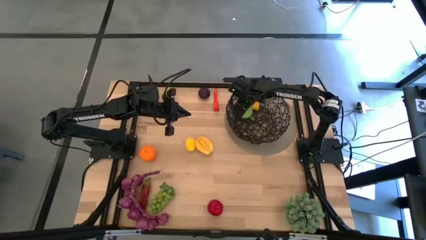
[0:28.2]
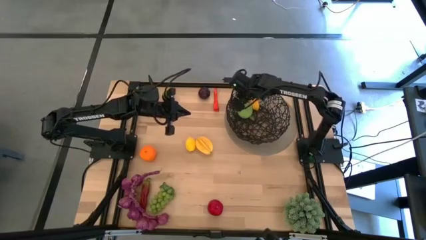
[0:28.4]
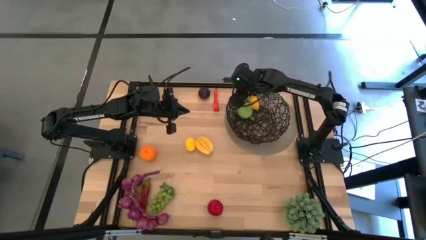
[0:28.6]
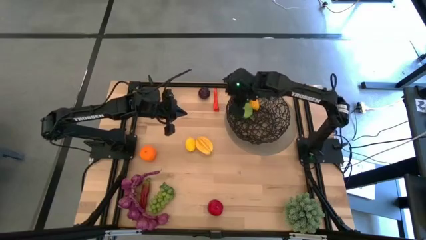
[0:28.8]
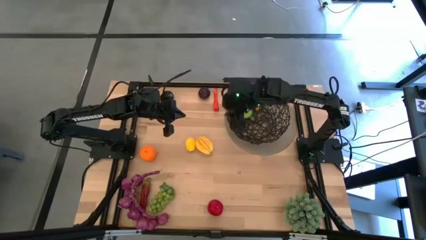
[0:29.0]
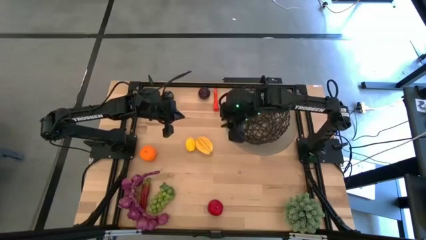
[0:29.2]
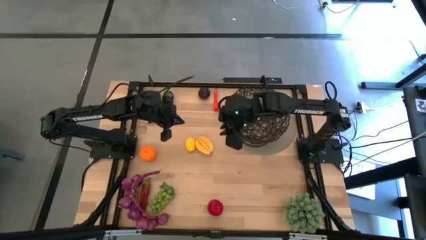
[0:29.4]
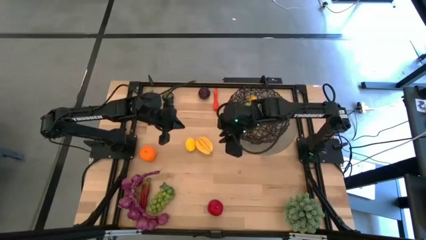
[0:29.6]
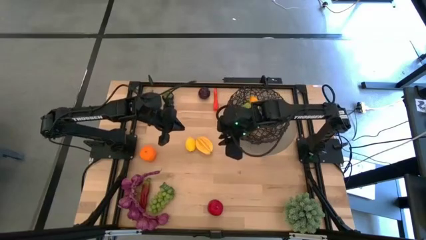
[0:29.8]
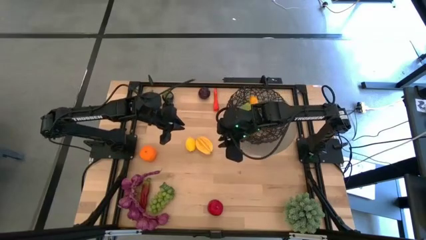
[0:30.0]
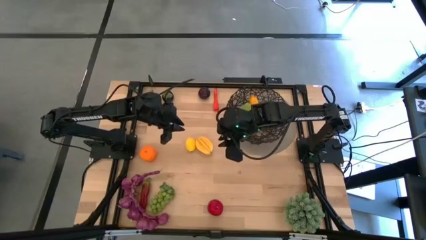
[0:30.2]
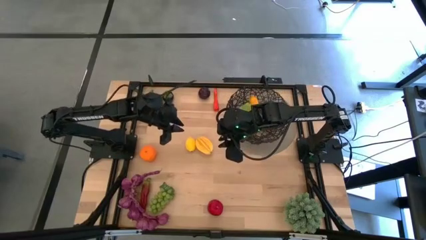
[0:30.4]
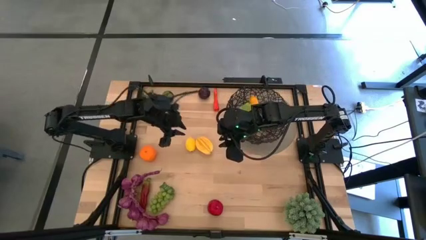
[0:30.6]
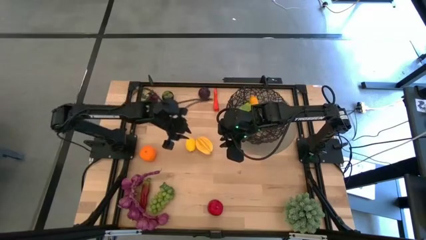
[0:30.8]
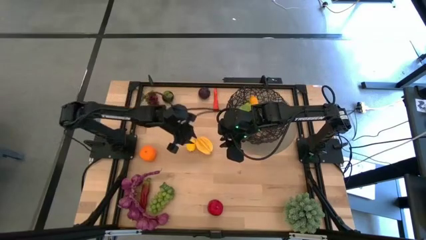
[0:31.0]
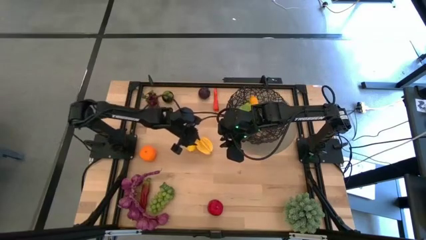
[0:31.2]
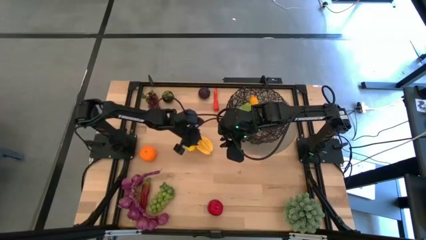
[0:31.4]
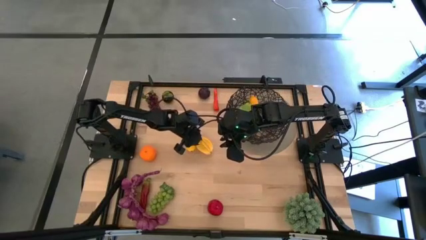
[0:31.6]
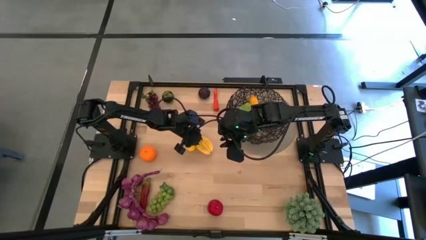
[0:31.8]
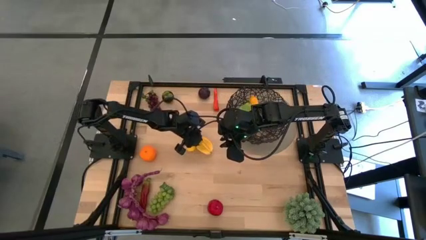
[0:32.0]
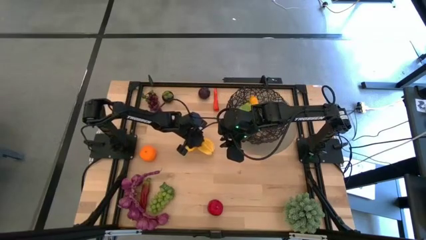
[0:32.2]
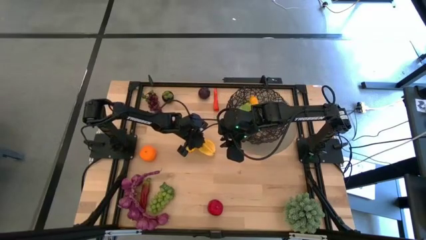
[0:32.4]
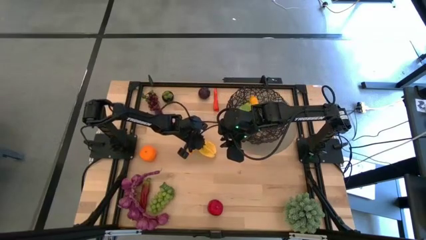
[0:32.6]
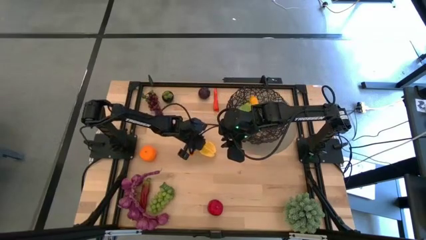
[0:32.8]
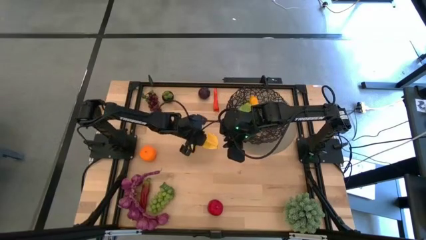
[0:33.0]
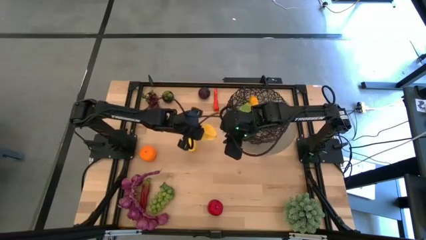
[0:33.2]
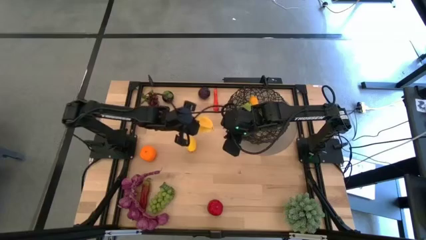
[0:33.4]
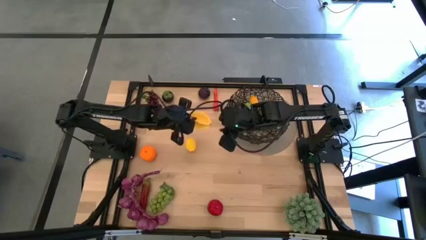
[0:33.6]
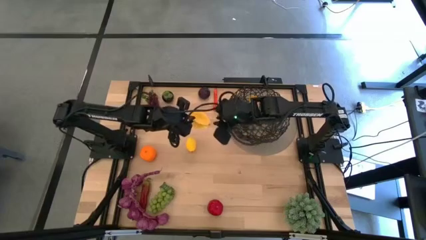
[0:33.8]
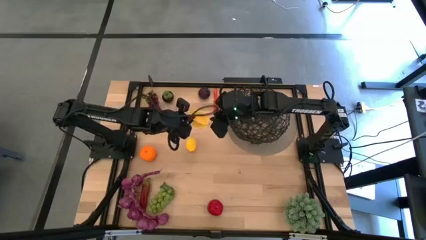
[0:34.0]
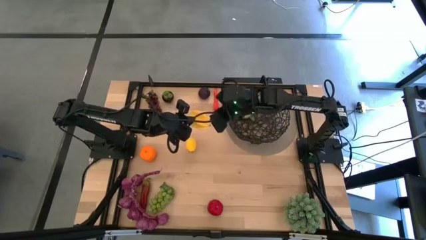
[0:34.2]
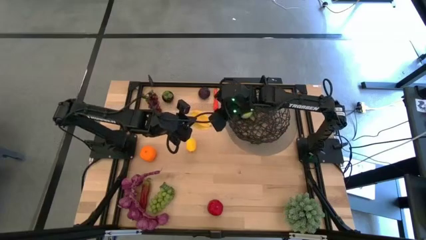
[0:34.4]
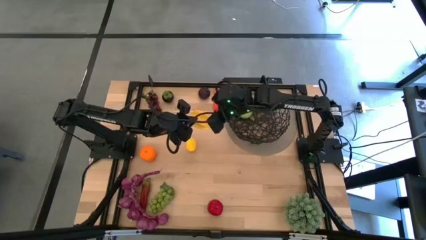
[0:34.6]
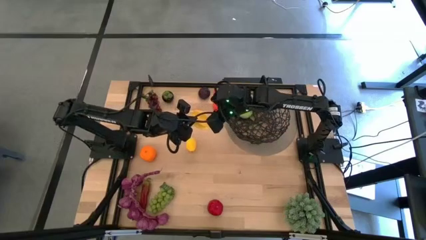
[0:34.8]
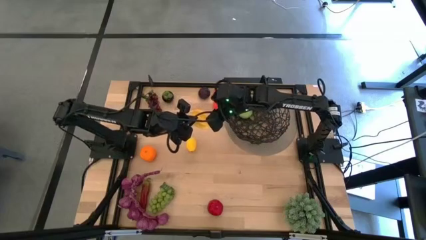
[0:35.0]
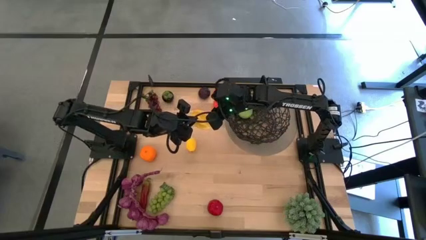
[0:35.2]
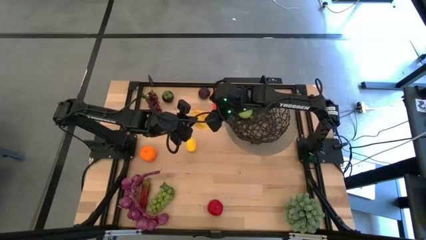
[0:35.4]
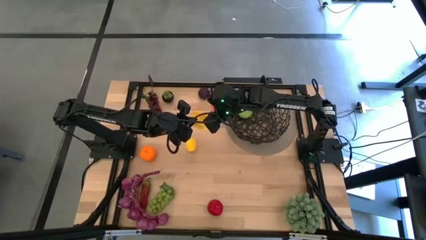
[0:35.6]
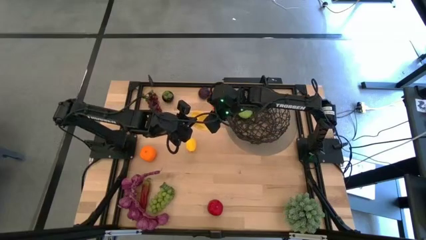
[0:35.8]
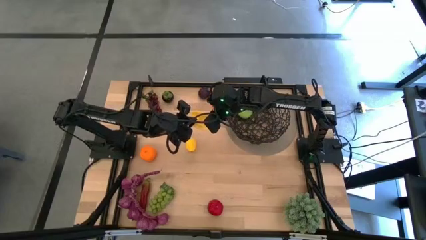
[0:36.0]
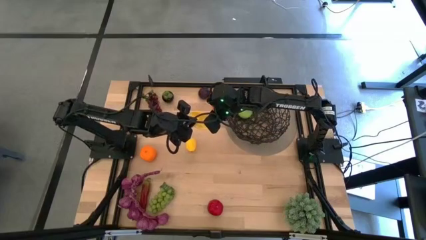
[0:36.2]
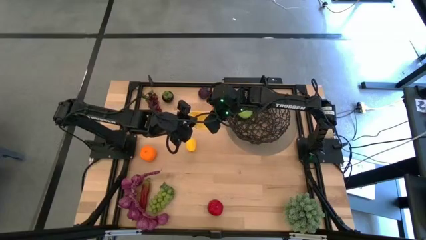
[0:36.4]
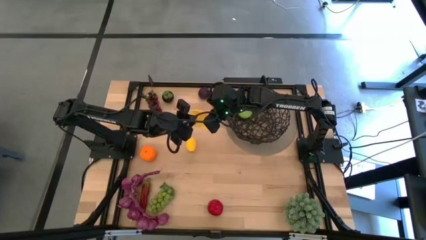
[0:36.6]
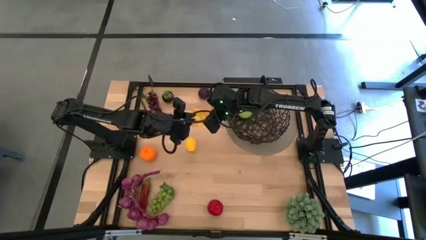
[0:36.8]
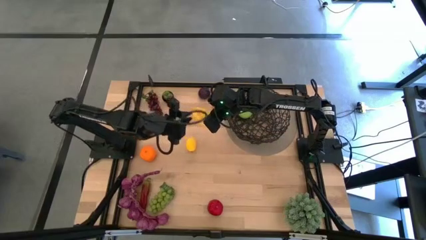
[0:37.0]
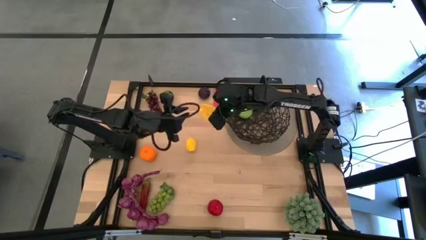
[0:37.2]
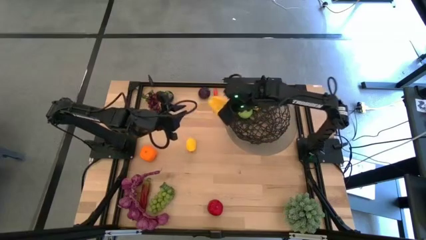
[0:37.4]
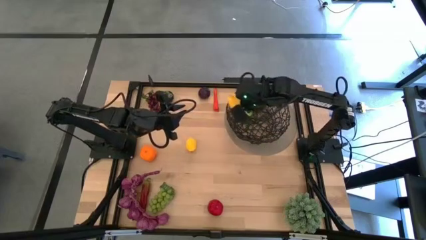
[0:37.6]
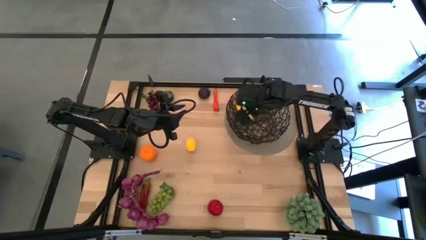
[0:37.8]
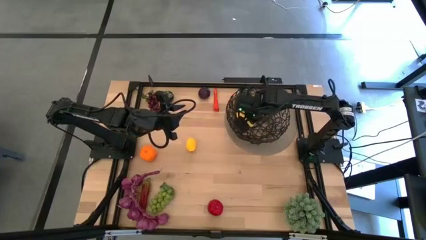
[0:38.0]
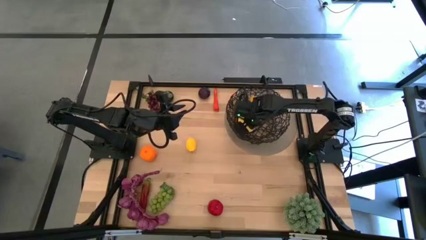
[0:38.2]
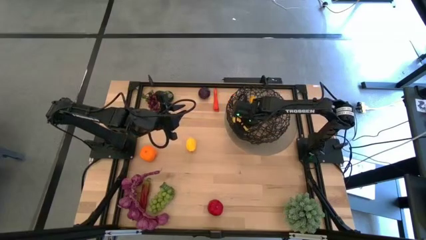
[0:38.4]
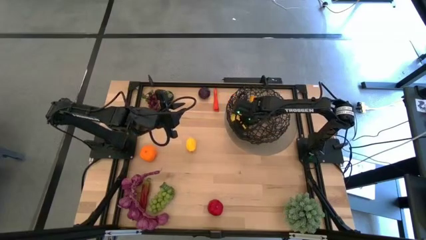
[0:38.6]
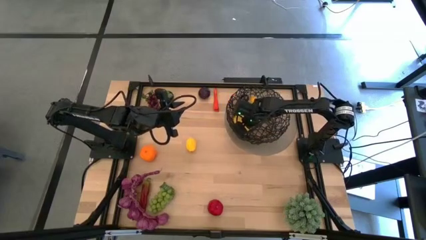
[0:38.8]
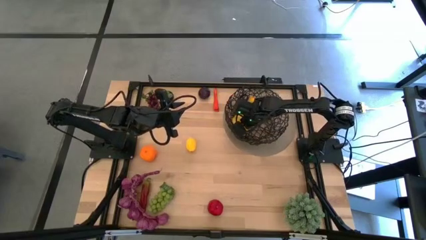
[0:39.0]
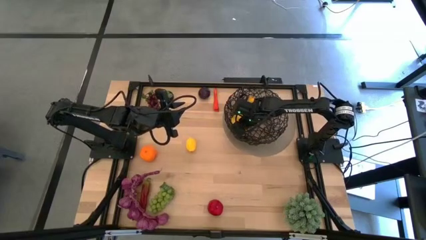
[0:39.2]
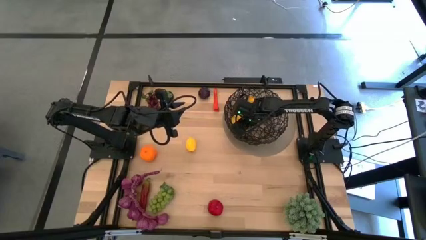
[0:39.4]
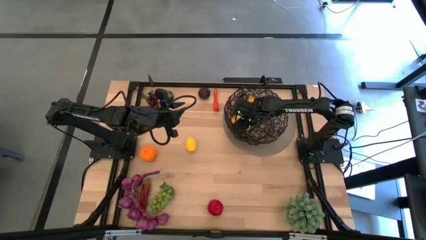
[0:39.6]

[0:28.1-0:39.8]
Task: Build produce basket
Put the starfruit into the black wire basket

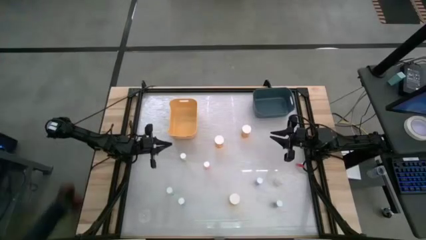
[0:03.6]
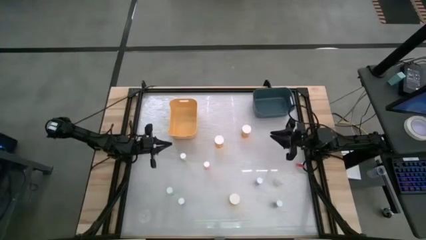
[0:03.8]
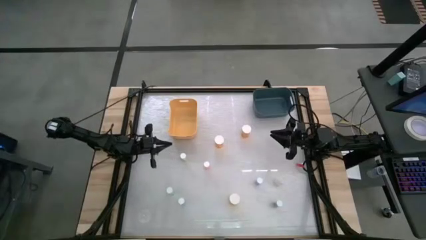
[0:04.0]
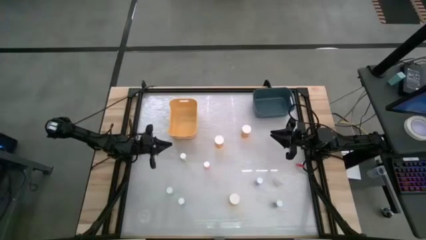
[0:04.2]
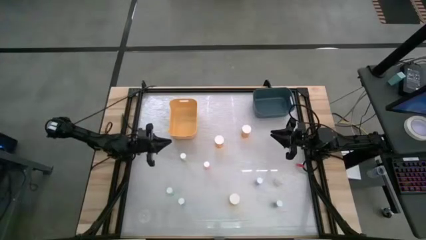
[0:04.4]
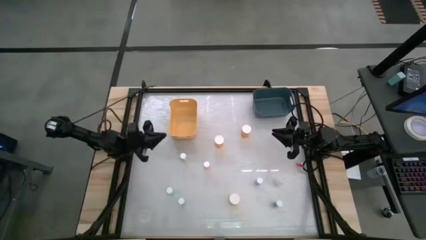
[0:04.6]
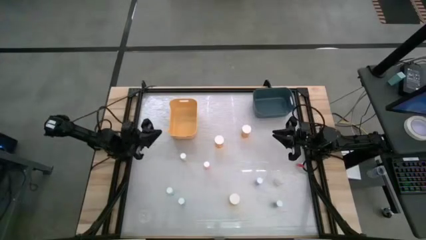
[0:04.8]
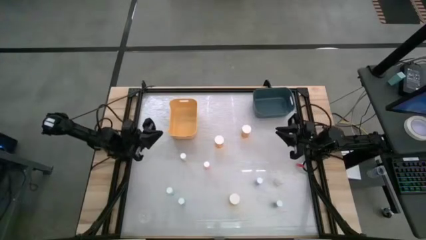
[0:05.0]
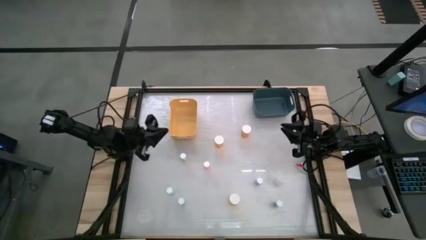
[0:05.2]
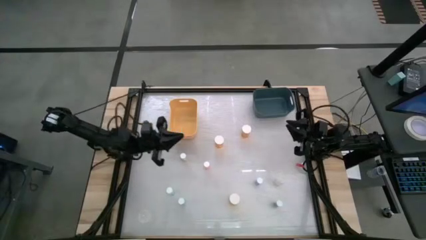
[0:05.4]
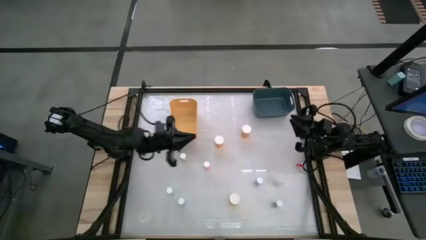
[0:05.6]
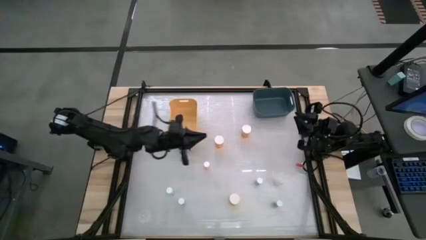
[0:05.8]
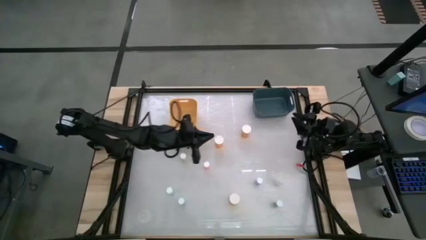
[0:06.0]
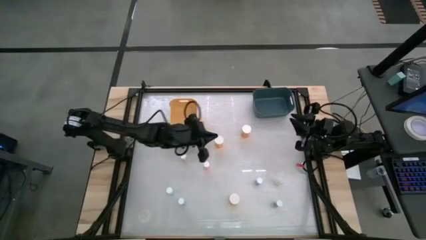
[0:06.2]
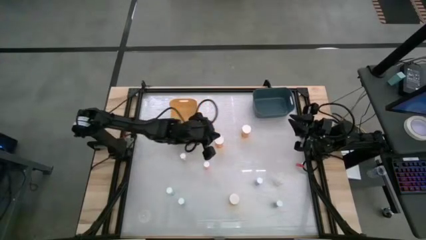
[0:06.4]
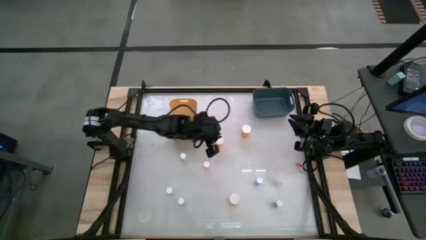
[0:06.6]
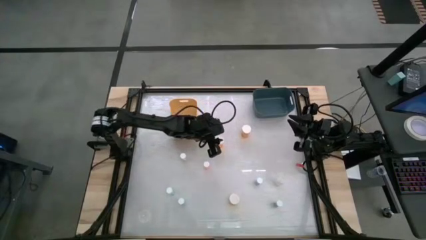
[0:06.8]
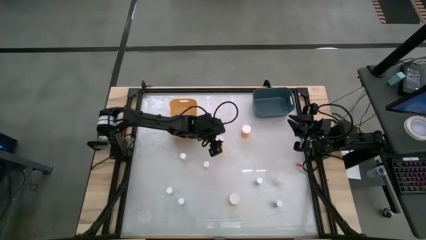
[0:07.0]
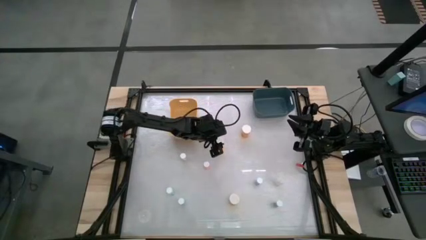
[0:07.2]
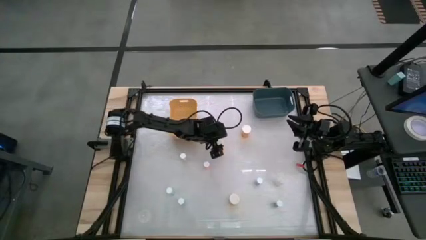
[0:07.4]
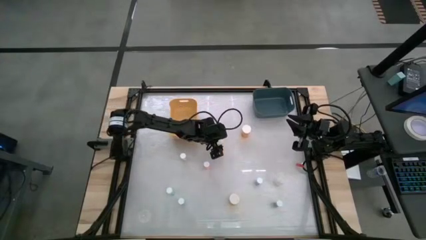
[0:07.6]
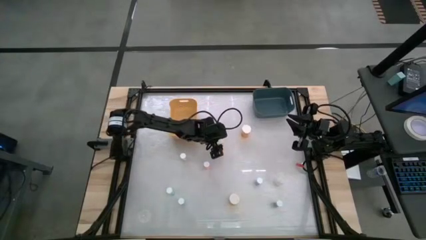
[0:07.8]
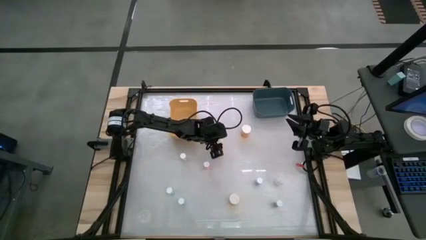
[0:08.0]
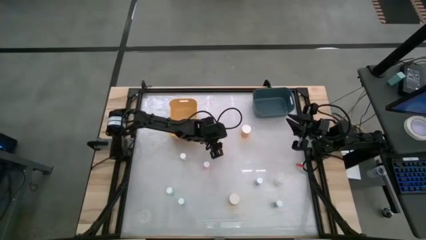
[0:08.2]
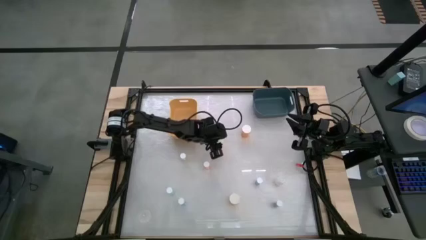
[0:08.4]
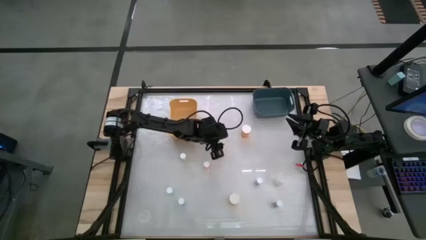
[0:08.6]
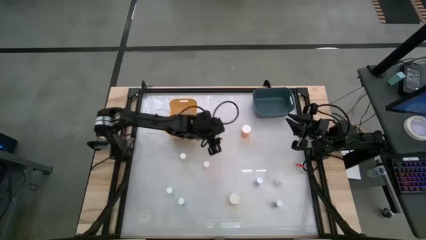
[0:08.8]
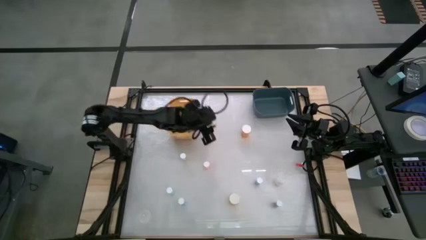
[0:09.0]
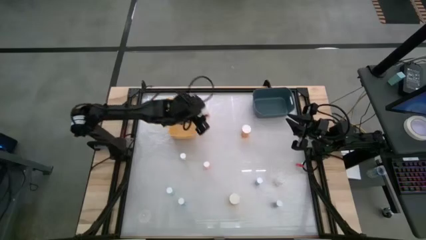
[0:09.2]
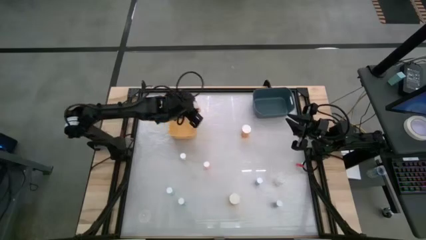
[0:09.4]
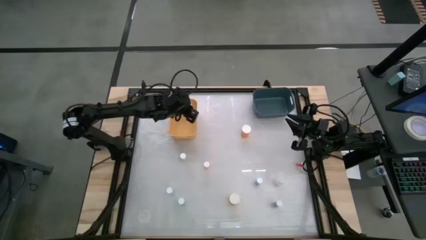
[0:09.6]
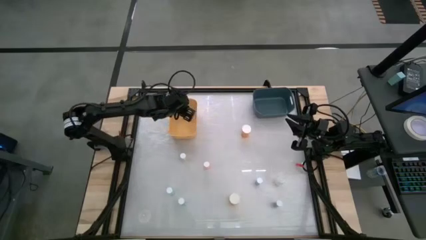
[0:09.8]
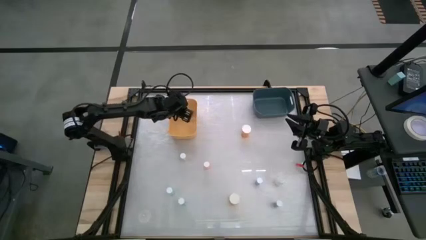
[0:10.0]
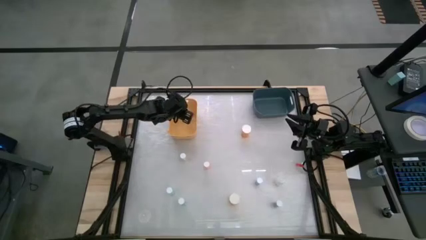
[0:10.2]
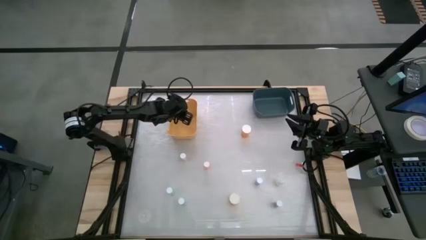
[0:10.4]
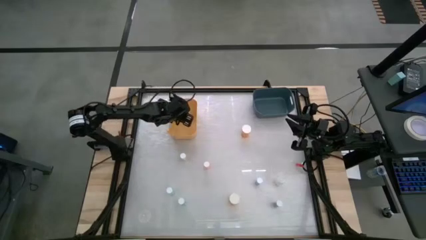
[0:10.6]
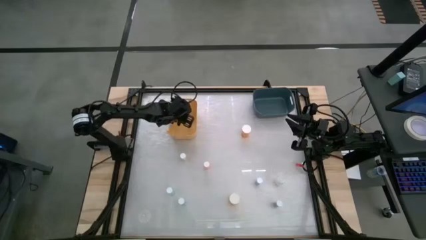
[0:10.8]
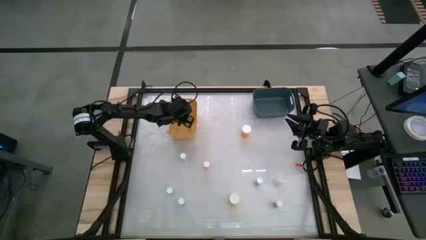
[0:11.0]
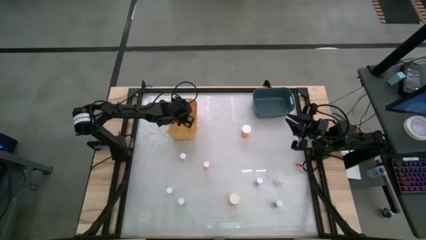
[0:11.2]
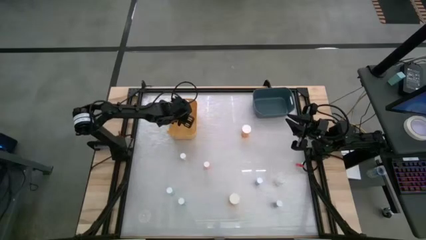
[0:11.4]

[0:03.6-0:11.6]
Task: Pick and place medicine bottles into bin by pill shape (circle, oval)
Put the orange bottle pill into the yellow bin
